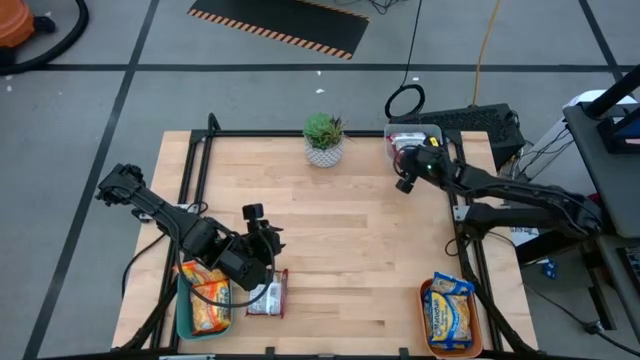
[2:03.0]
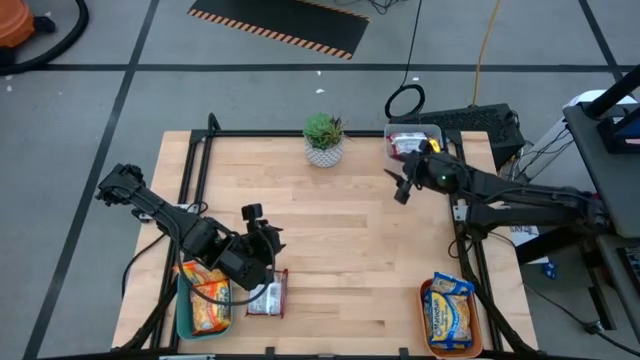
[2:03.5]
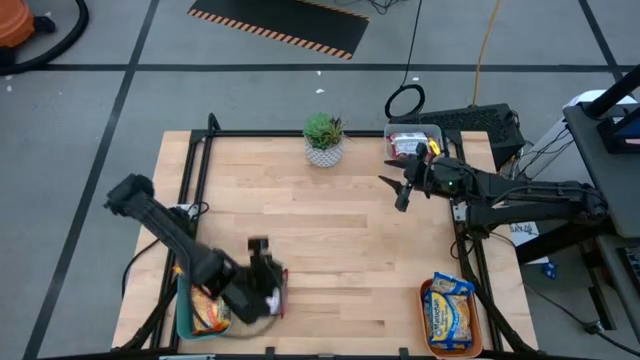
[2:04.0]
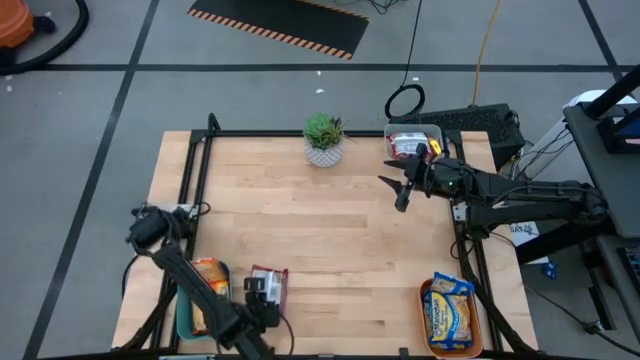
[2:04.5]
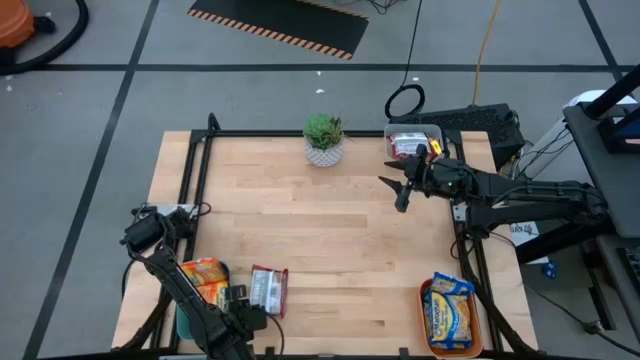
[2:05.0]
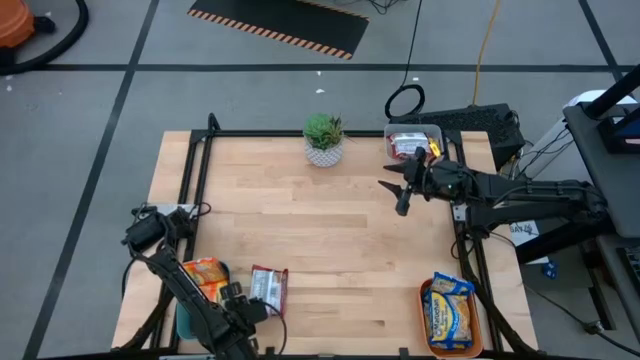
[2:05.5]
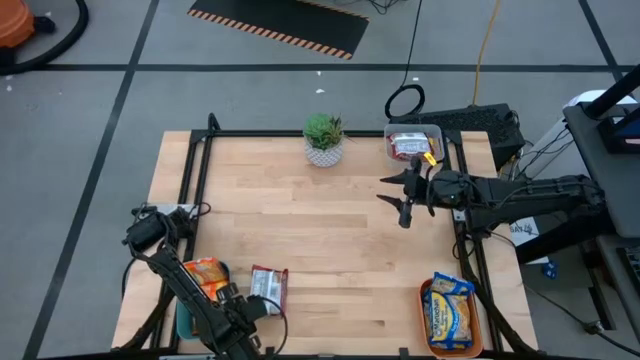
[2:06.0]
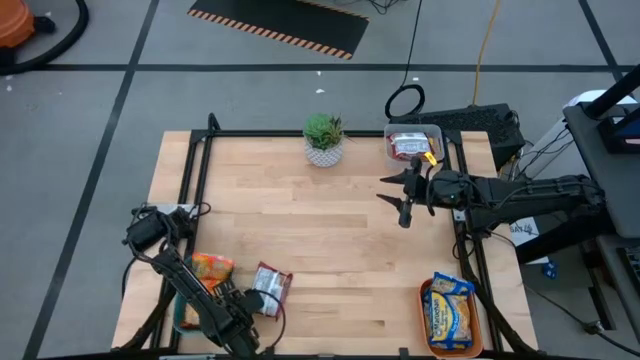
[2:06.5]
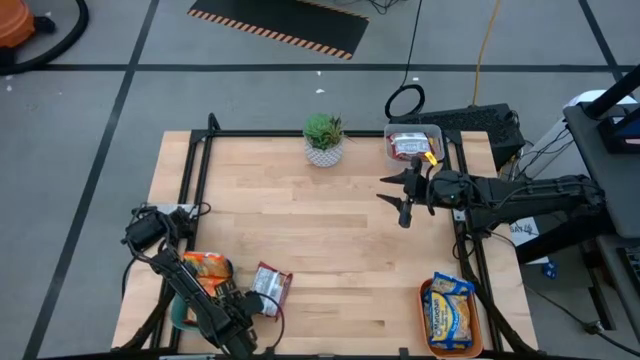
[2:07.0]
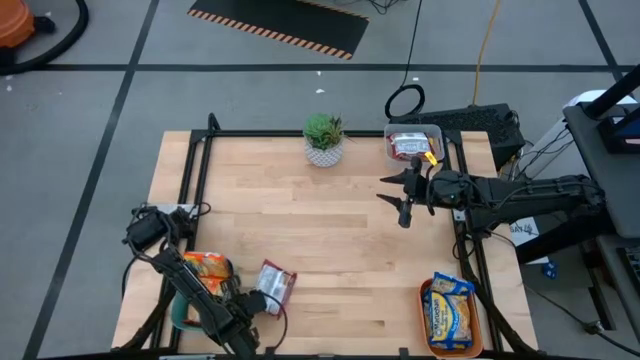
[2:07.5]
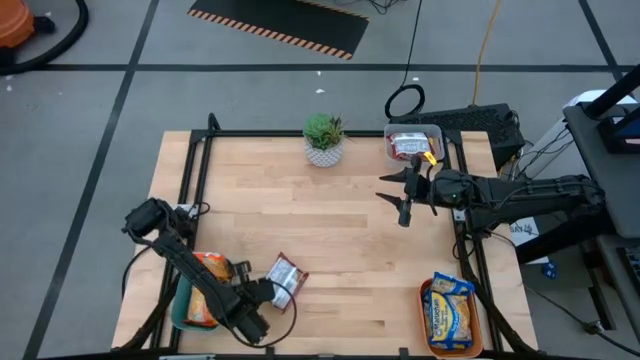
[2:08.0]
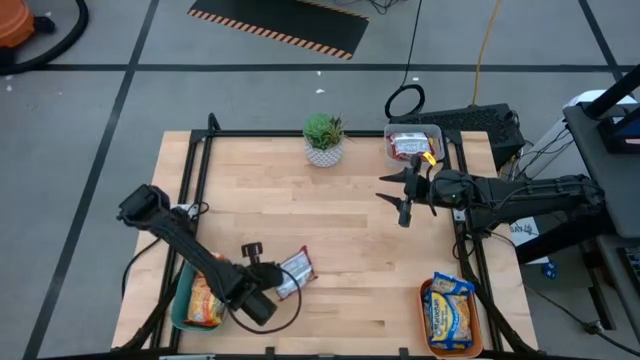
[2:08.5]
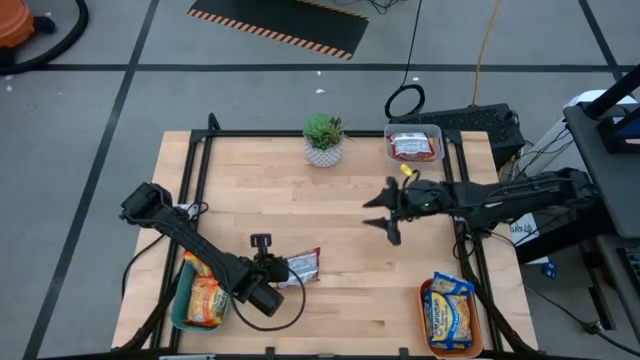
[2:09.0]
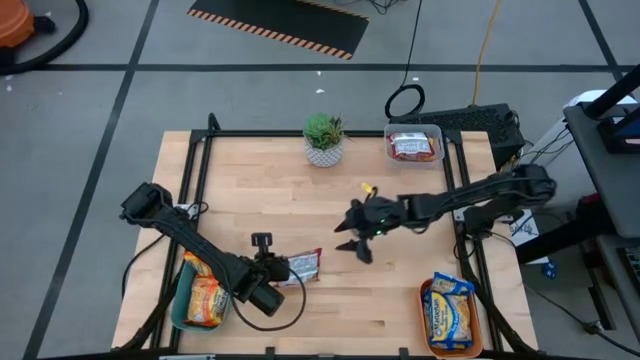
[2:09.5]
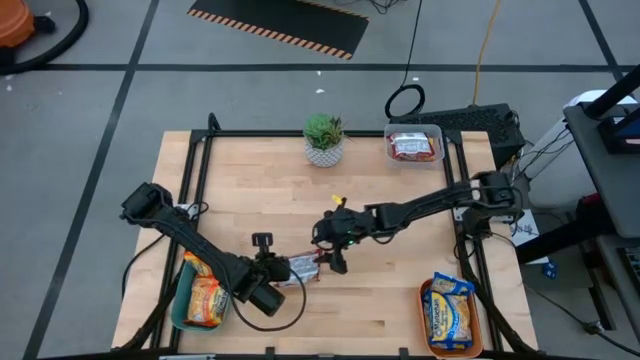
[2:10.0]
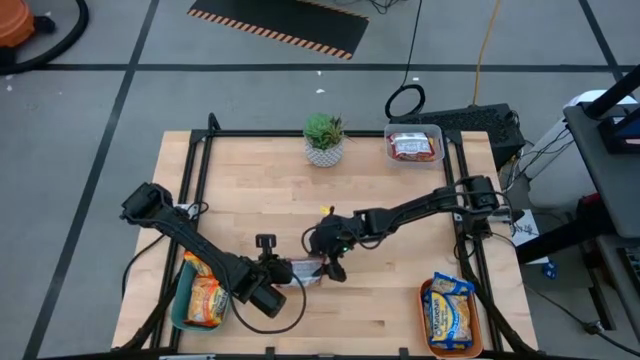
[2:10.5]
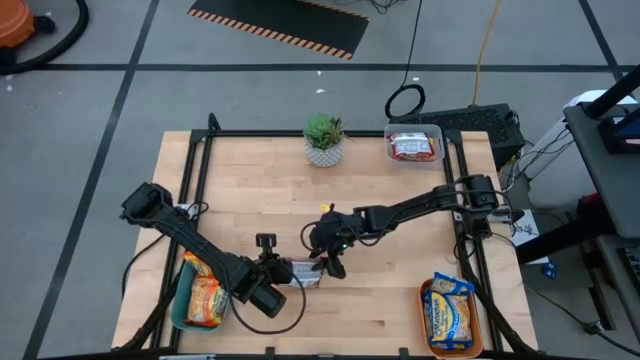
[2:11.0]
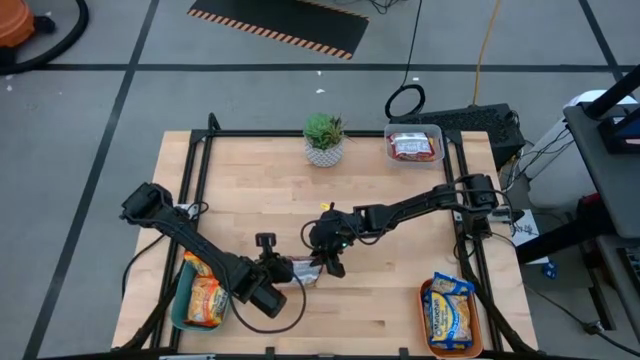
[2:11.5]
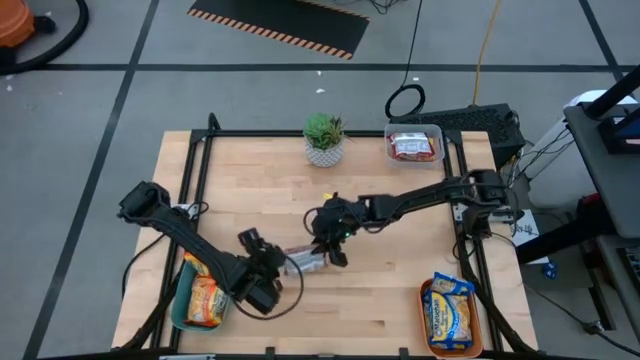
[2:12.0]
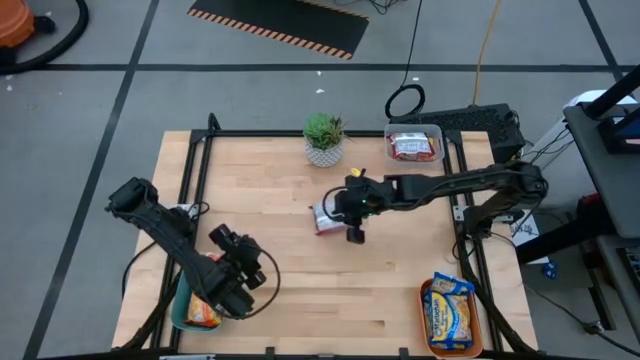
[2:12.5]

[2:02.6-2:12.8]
Task: Sort Maruchan noodles
Put the red noodle pack into the transparent bin

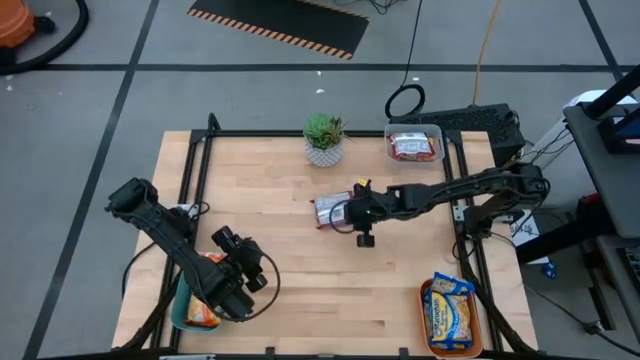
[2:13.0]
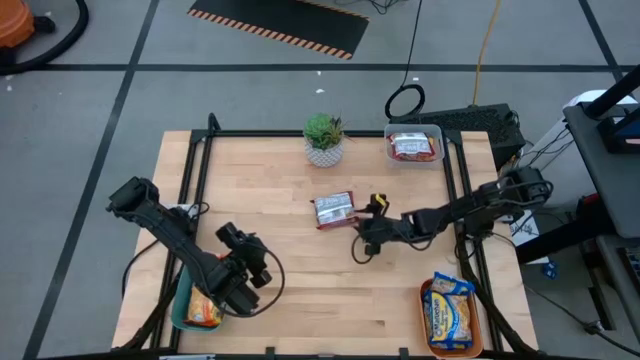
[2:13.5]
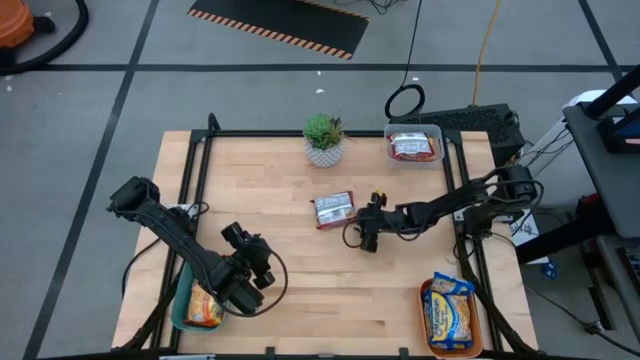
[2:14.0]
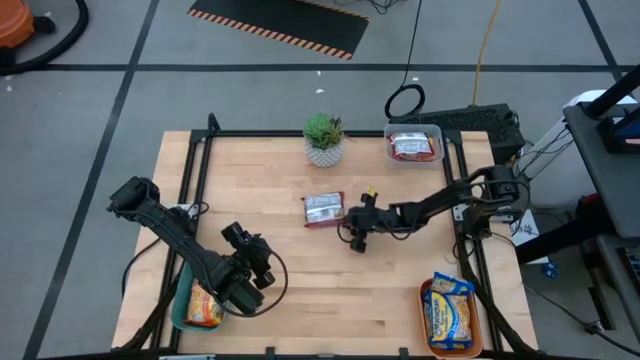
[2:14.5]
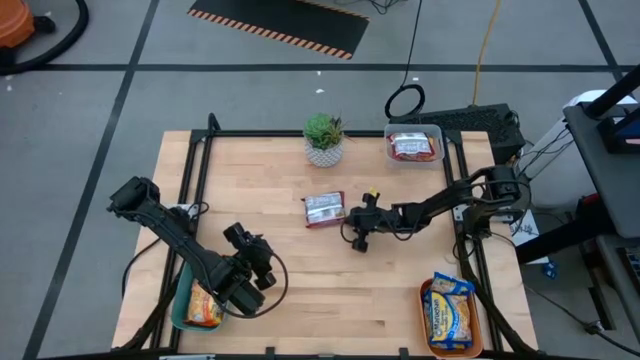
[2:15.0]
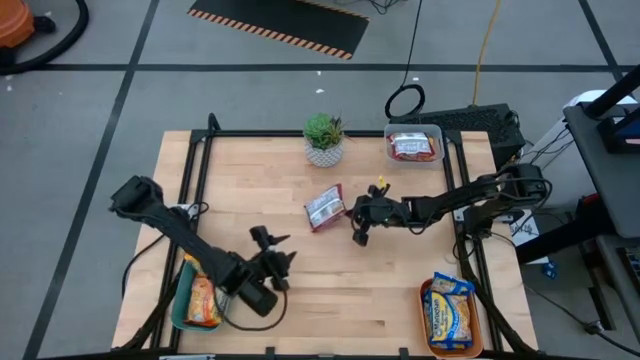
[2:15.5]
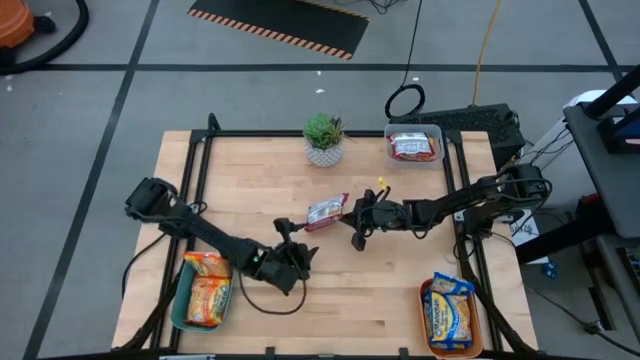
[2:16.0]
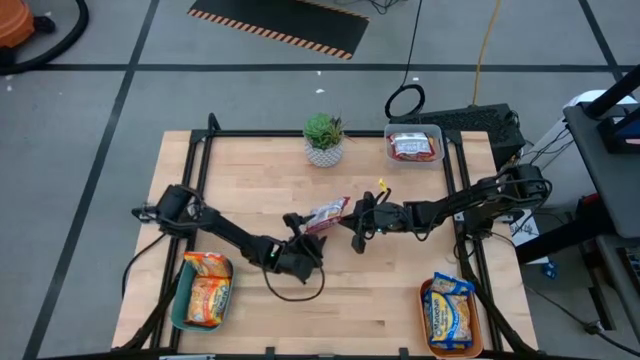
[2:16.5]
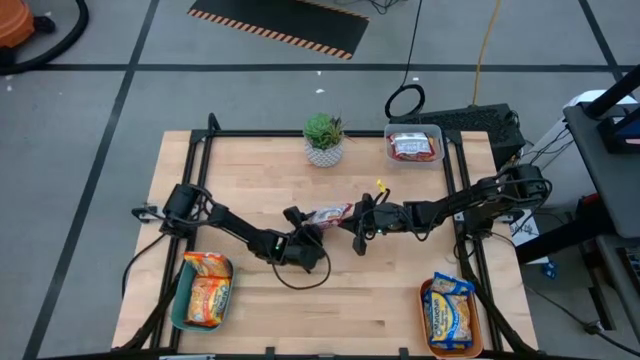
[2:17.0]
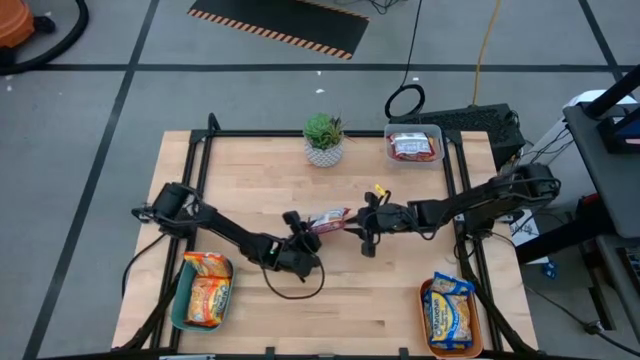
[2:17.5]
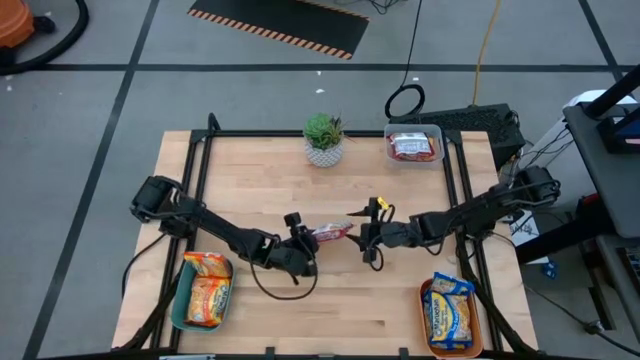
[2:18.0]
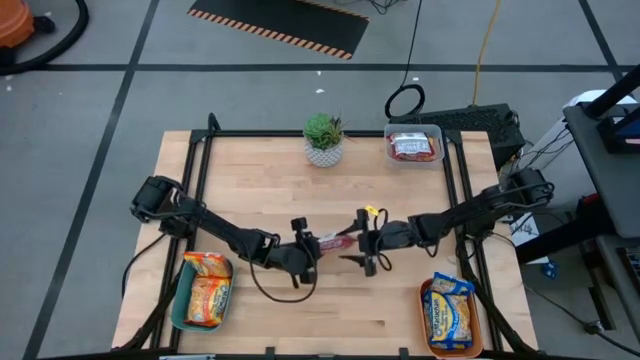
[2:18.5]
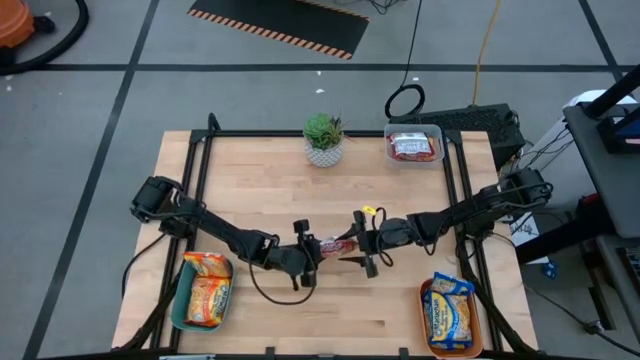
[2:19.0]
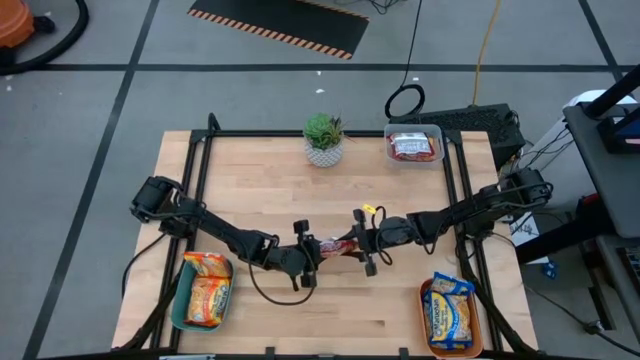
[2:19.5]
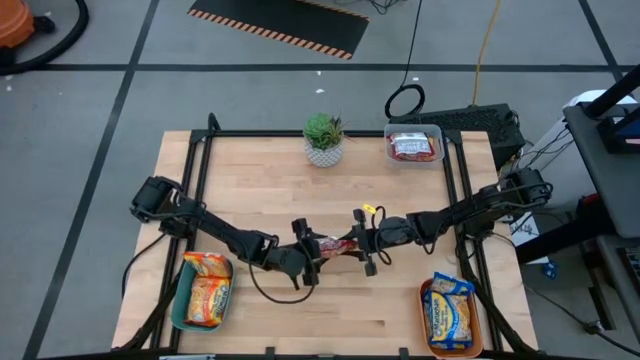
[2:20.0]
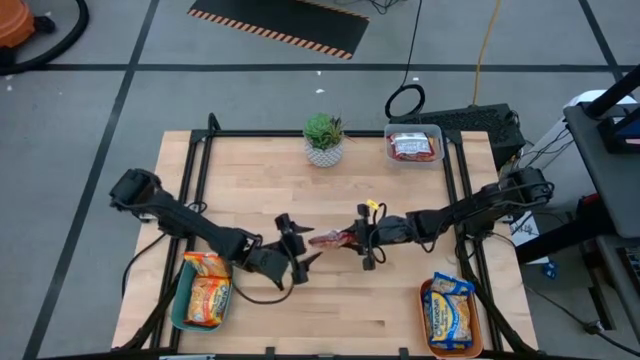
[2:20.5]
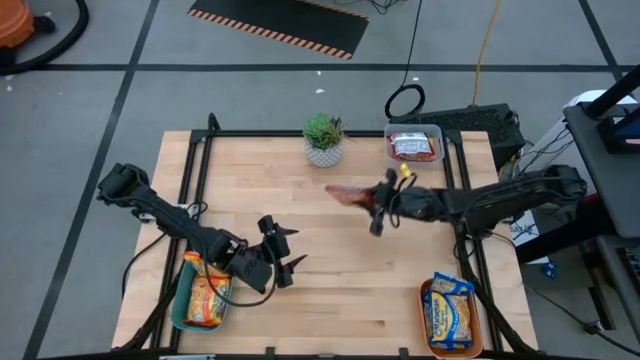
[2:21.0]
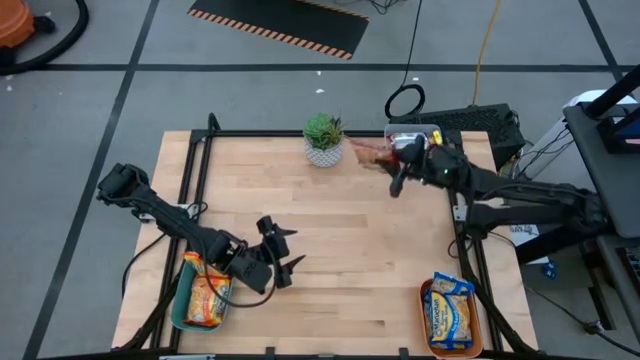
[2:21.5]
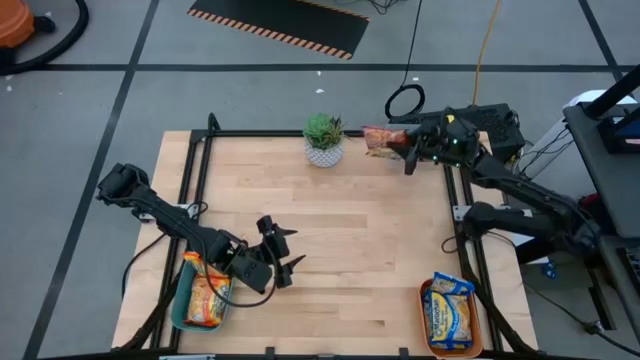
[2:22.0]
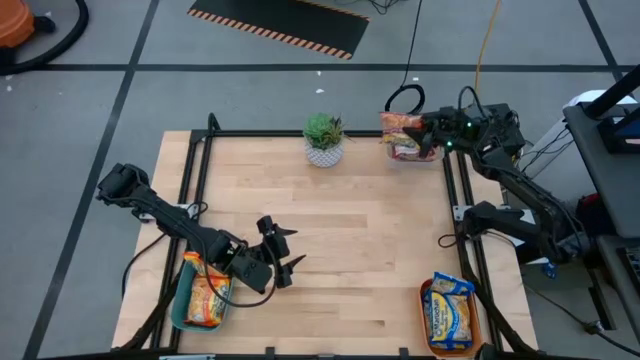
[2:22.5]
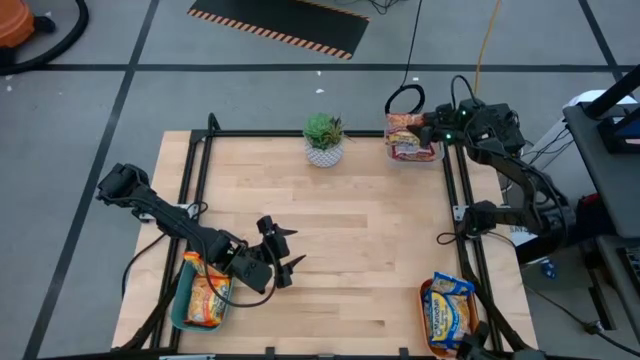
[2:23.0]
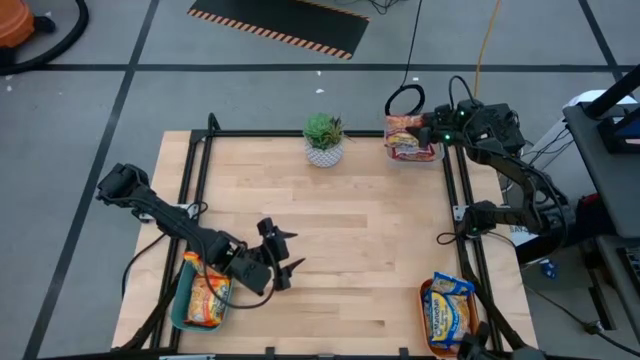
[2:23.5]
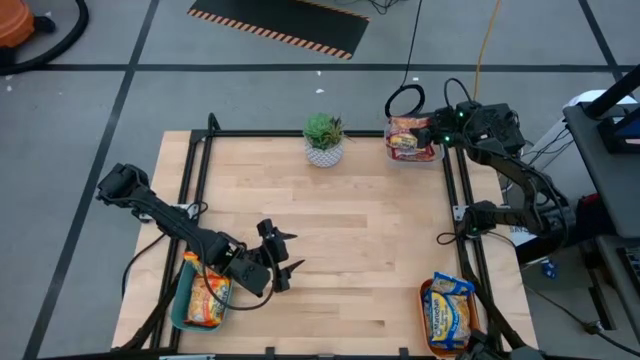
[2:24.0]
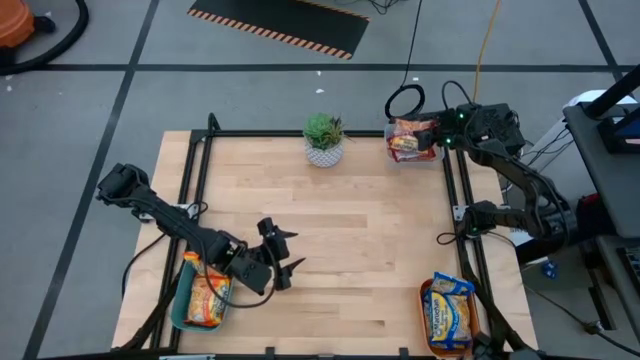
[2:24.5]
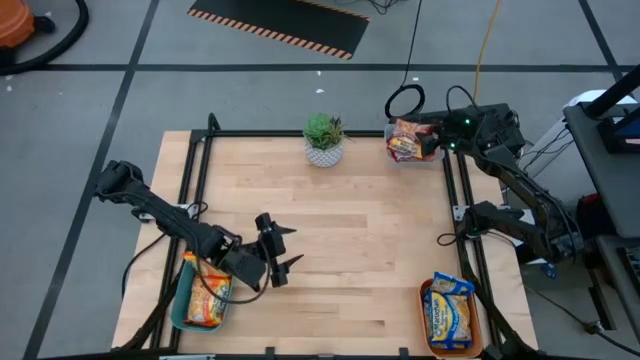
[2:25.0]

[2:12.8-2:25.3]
Put the red noodle pack into the transparent bin

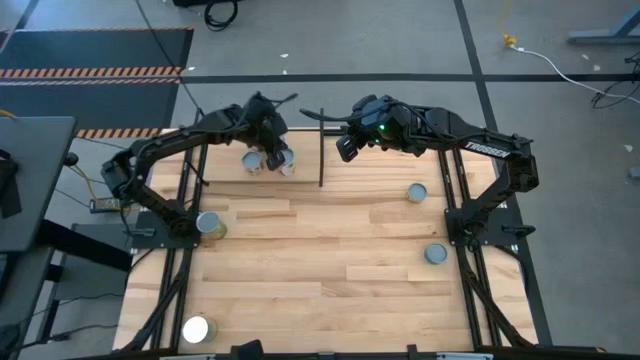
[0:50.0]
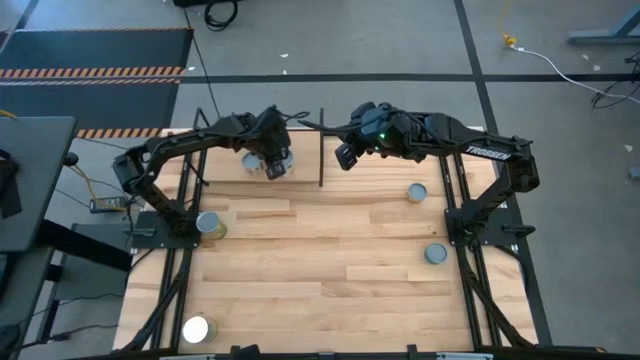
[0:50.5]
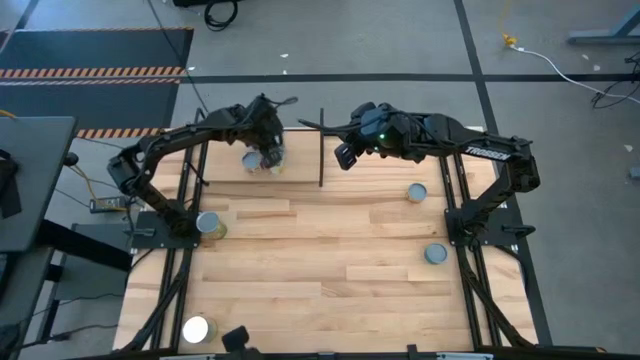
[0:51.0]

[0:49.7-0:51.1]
Task: Pick and place cans onto a shelf
Adjust the canned mixed fruits on the shelf
